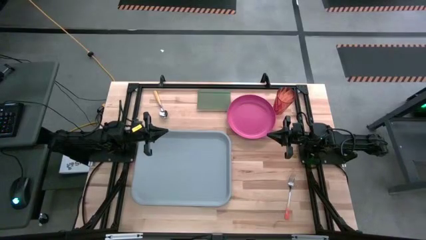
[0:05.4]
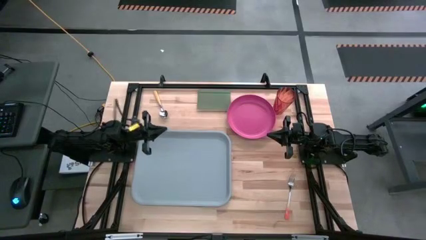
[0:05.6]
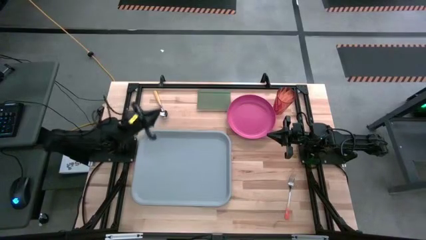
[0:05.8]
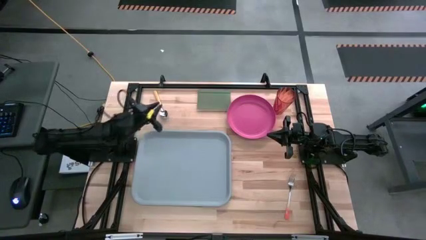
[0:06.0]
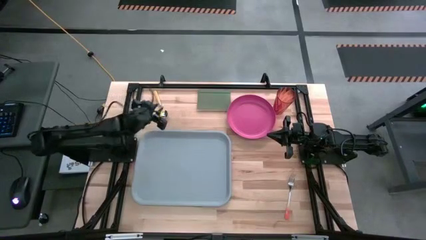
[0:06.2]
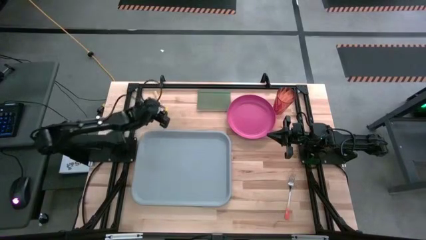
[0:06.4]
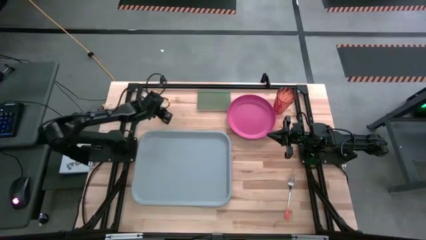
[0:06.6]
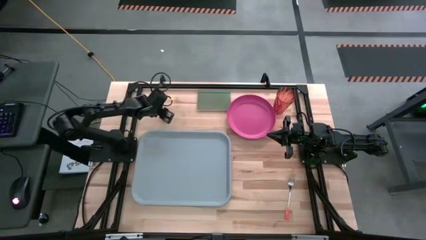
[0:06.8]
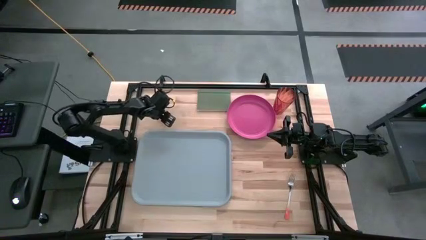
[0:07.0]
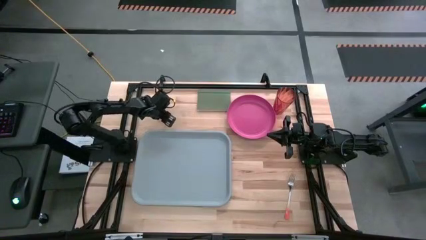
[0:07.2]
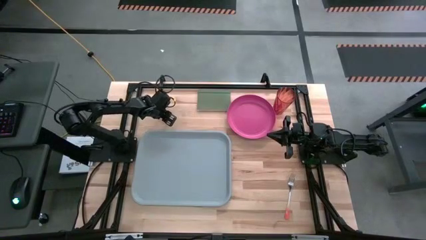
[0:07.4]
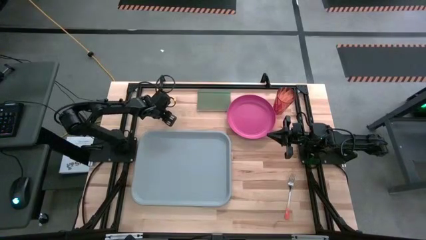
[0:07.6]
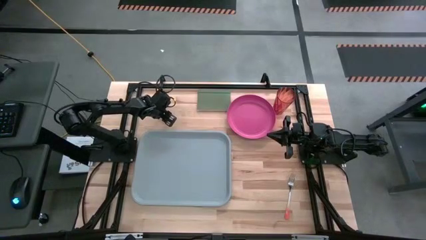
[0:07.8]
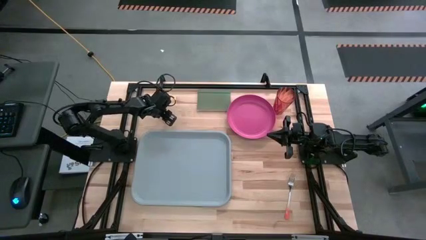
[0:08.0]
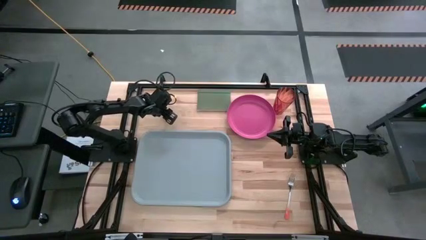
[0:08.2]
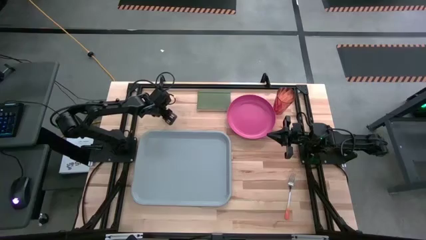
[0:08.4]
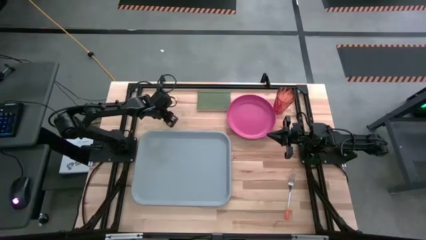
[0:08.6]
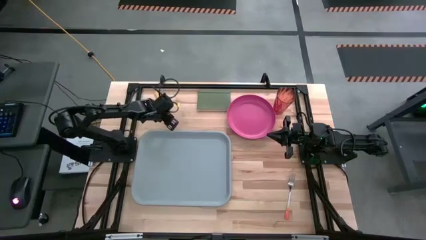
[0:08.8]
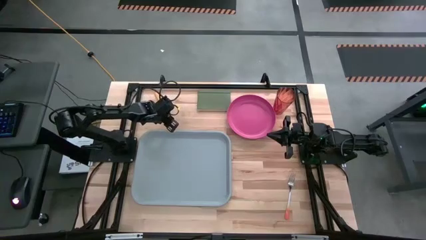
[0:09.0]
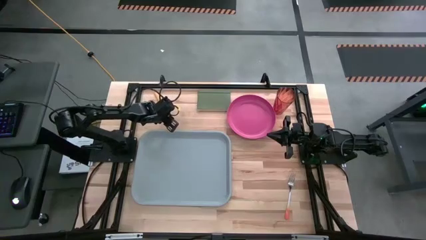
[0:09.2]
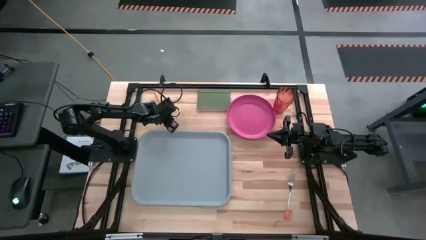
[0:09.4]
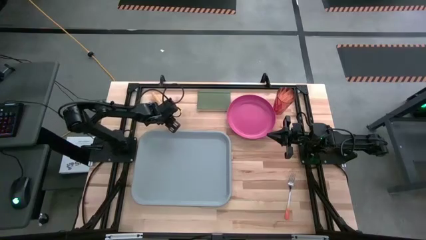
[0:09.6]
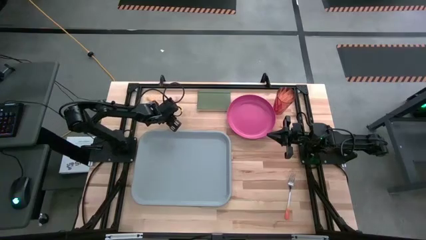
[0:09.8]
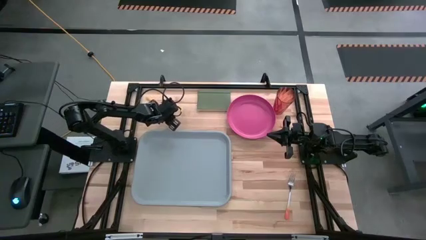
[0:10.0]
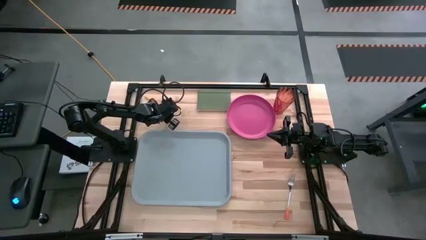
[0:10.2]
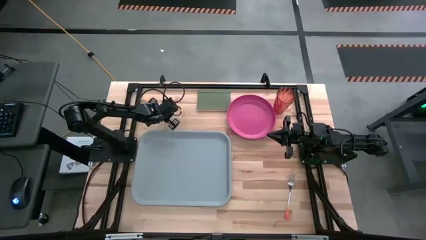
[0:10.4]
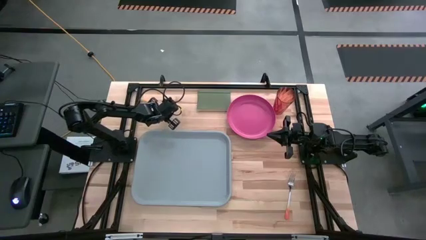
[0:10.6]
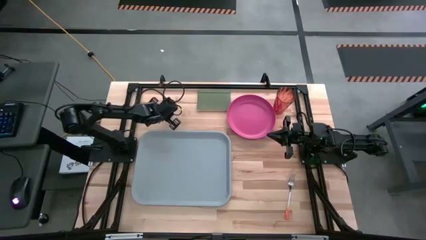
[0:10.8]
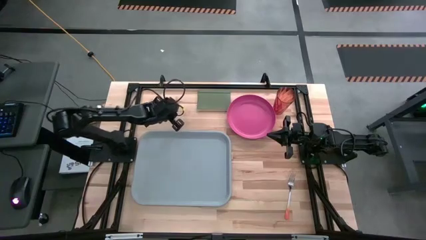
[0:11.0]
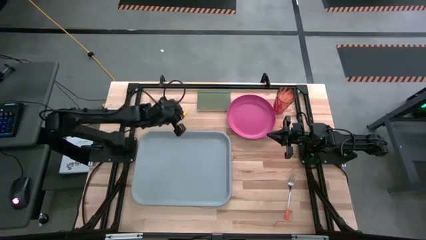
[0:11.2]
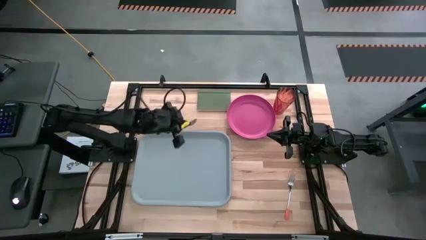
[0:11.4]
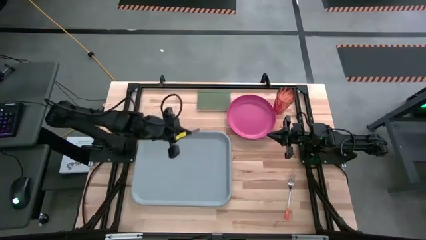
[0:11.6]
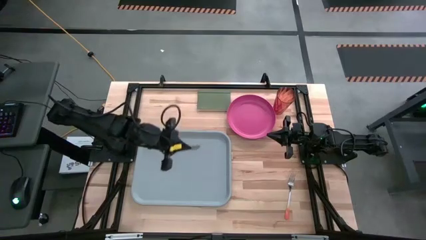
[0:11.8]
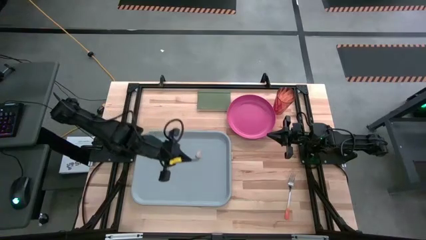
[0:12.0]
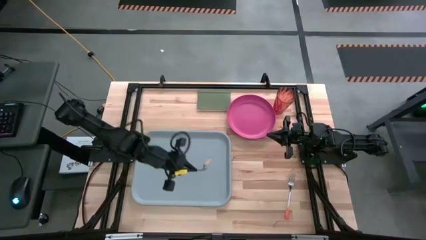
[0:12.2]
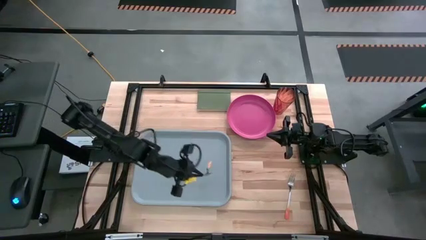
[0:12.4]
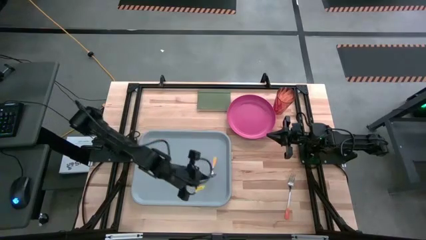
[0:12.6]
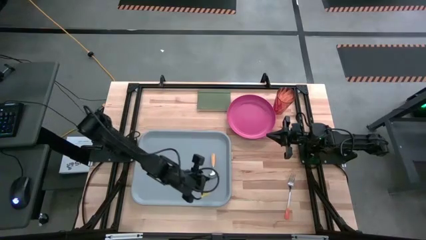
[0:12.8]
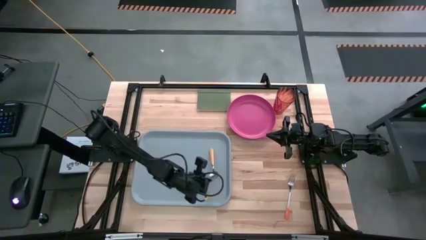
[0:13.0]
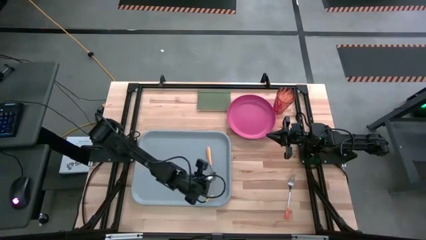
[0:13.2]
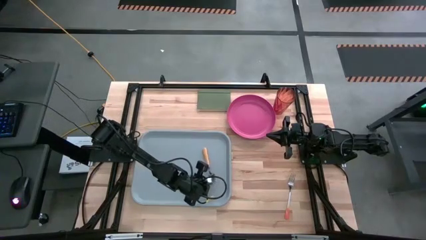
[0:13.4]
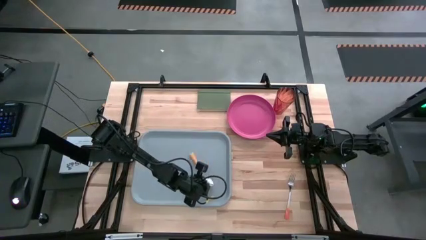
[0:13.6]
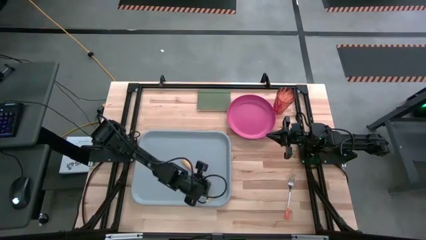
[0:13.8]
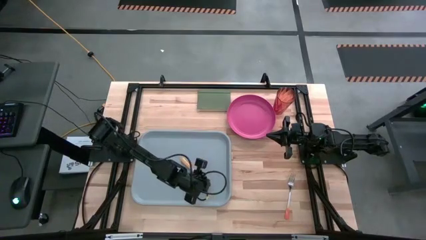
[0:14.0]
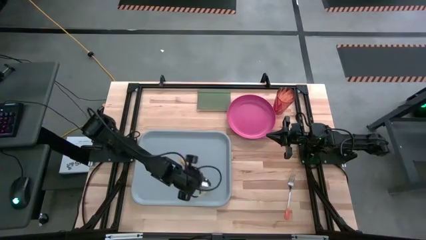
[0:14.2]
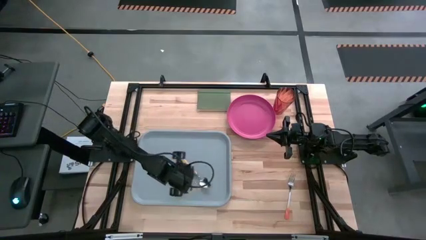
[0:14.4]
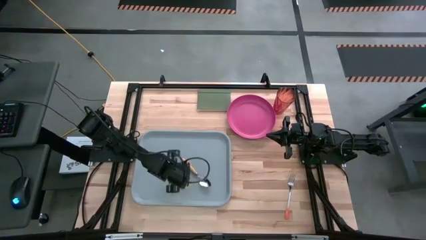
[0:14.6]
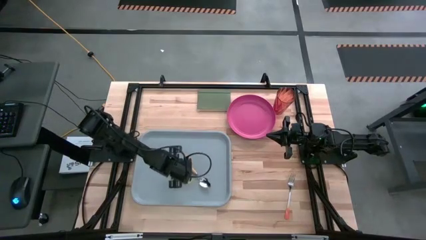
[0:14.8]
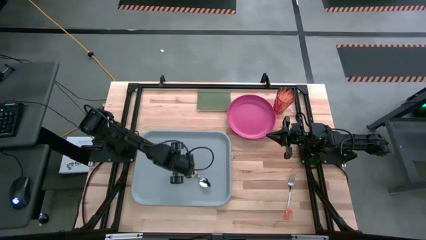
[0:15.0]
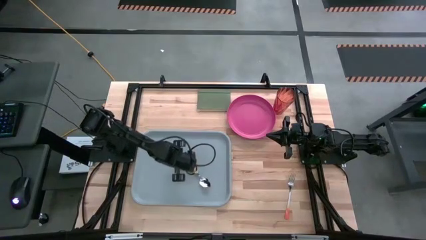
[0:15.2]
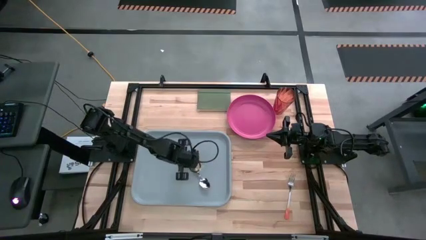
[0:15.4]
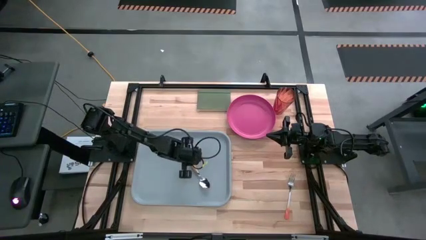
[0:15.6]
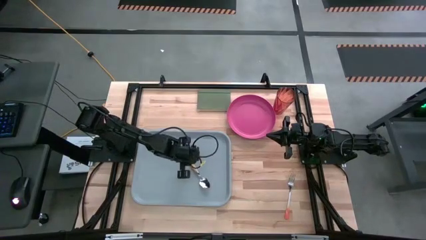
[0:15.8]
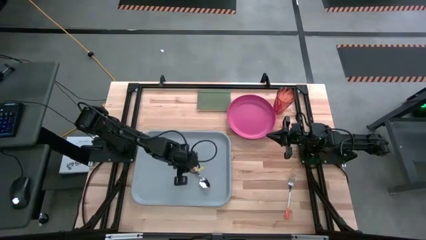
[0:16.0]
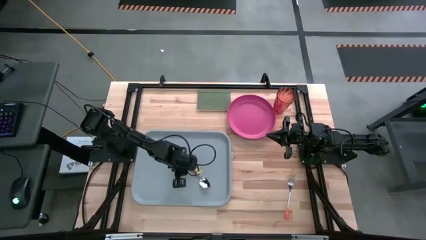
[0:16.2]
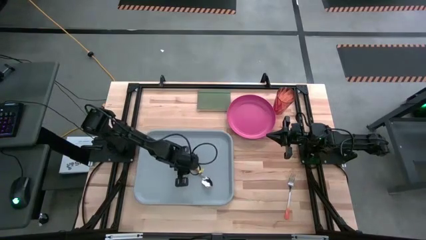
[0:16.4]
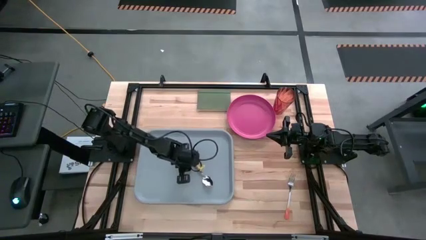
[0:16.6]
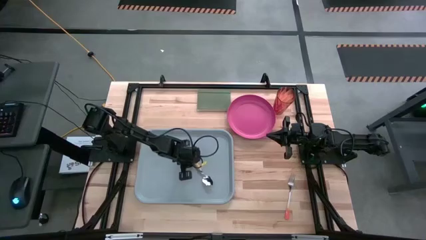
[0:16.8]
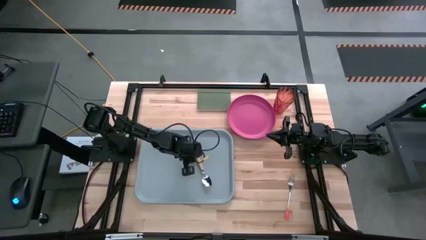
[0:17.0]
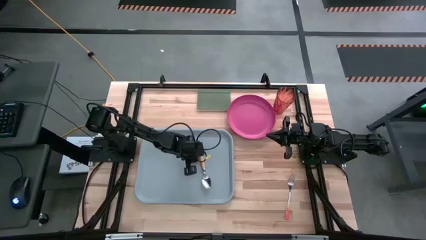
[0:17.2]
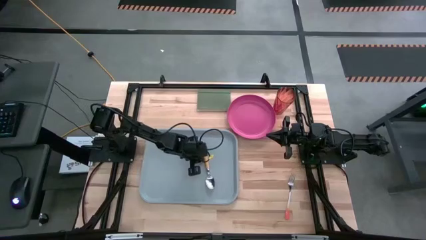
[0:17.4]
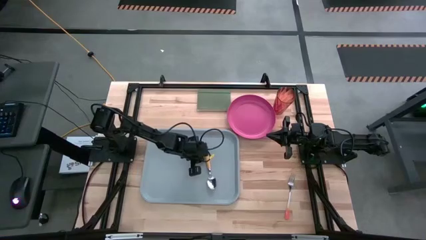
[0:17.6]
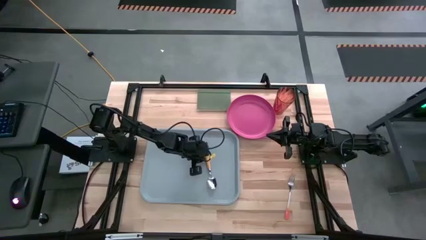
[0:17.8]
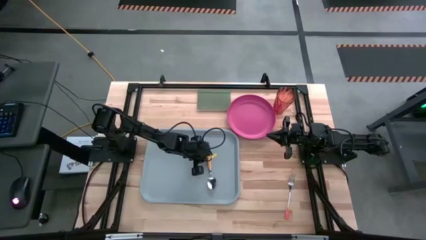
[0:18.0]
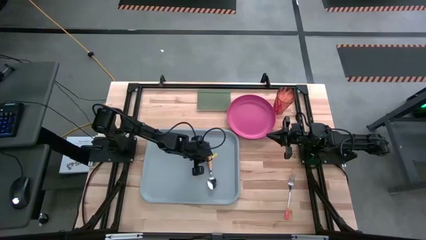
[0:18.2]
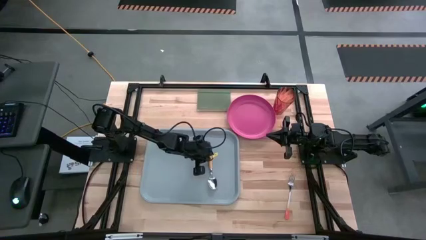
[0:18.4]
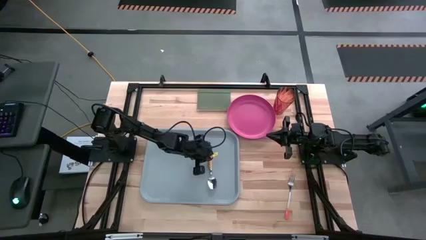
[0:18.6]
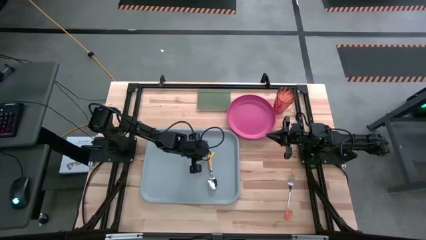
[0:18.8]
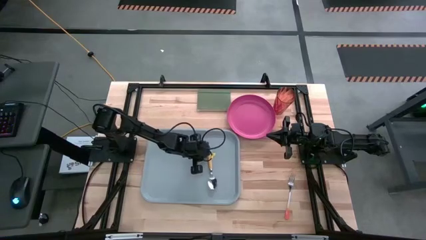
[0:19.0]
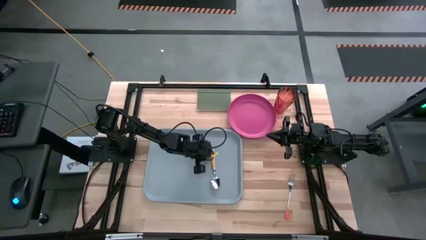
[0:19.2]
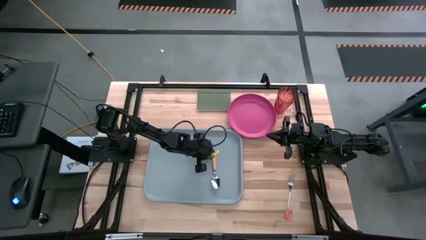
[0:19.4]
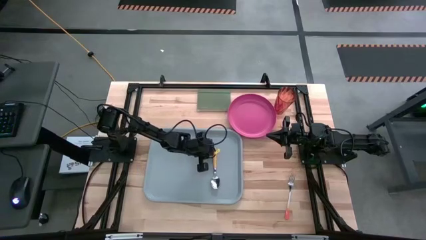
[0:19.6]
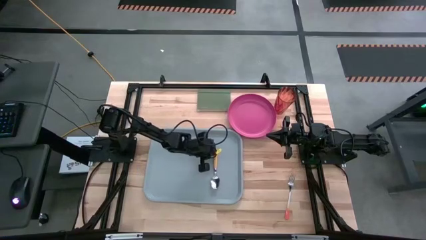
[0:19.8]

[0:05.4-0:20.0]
Task: Pick and place plate/cup/fork/spoon on tray
Put the yellow spoon on the gray tray
